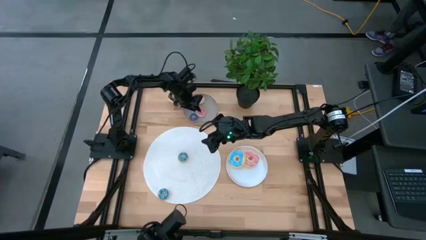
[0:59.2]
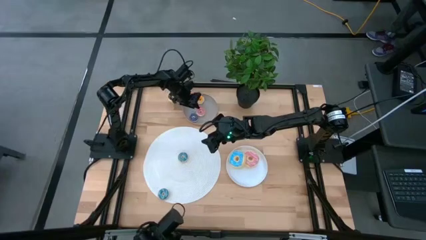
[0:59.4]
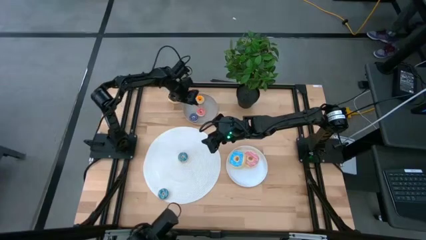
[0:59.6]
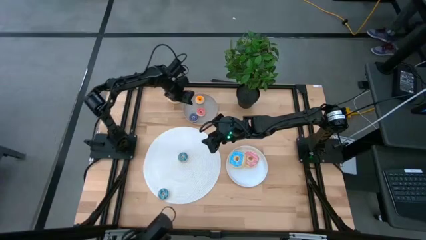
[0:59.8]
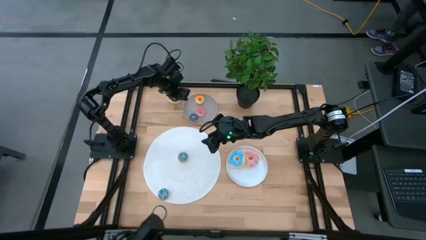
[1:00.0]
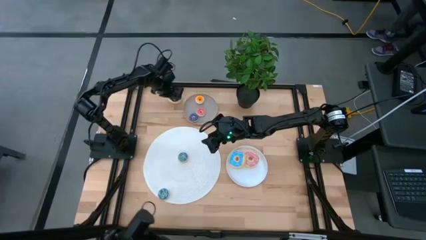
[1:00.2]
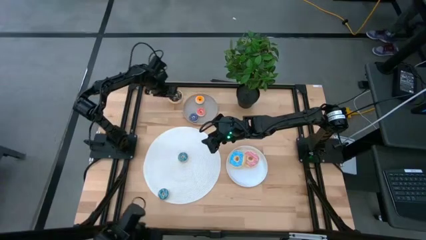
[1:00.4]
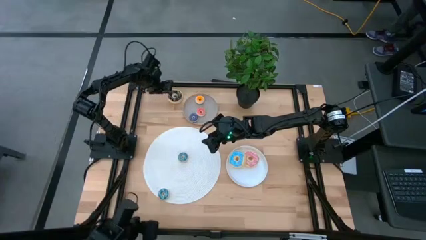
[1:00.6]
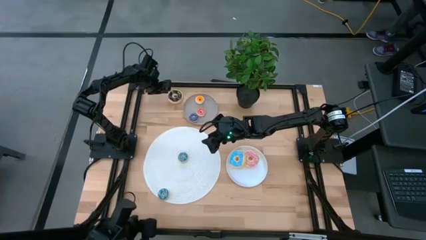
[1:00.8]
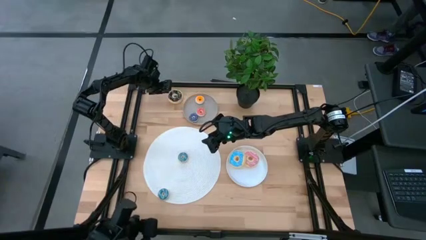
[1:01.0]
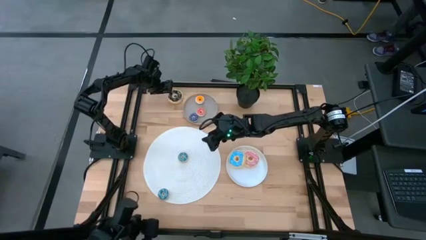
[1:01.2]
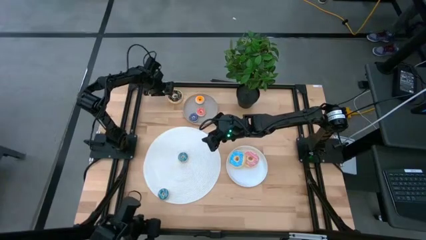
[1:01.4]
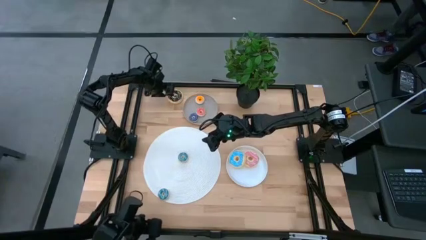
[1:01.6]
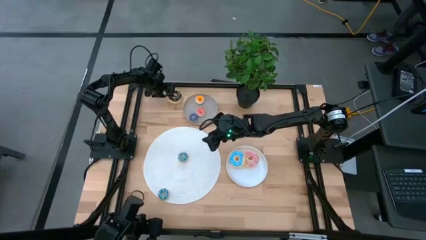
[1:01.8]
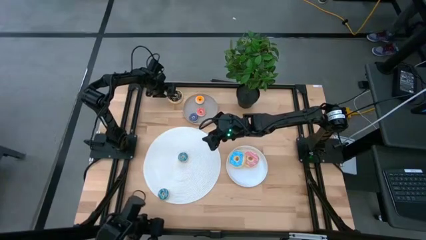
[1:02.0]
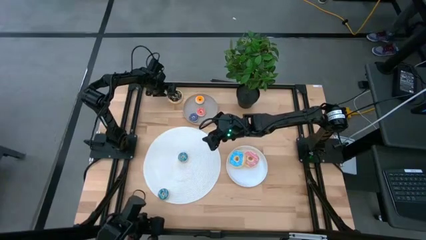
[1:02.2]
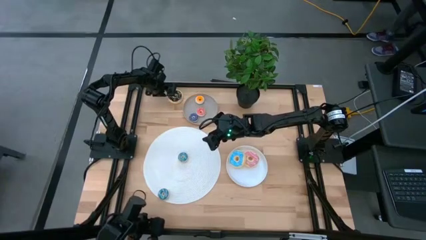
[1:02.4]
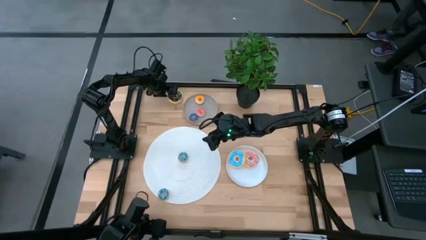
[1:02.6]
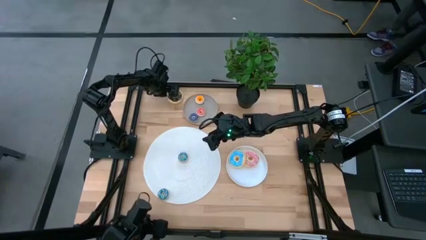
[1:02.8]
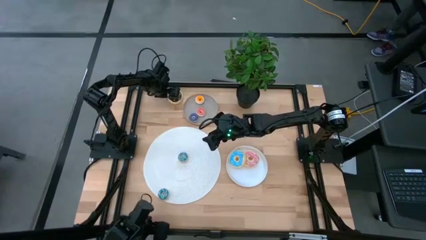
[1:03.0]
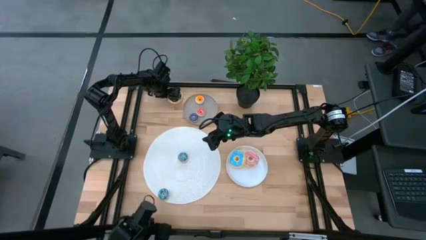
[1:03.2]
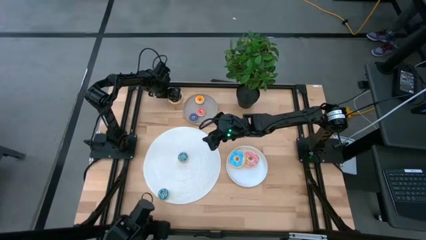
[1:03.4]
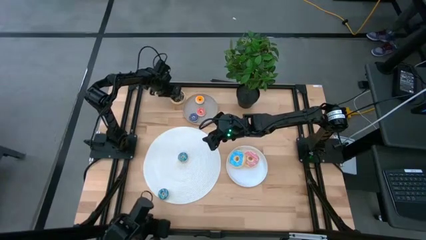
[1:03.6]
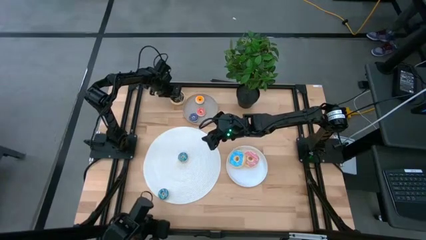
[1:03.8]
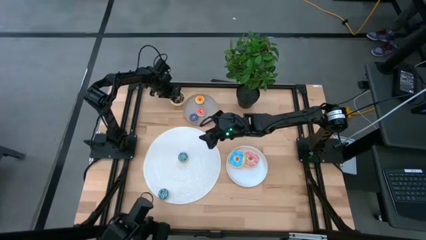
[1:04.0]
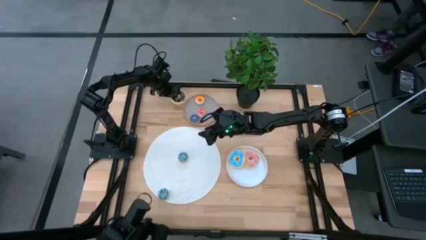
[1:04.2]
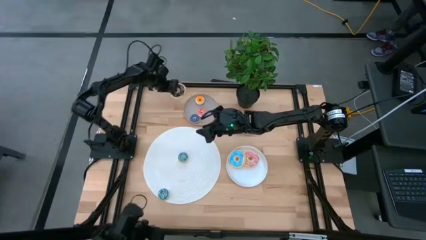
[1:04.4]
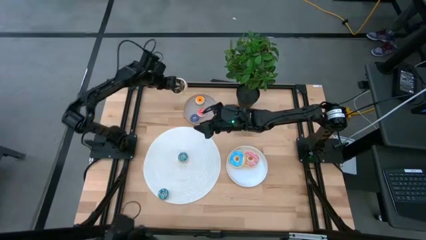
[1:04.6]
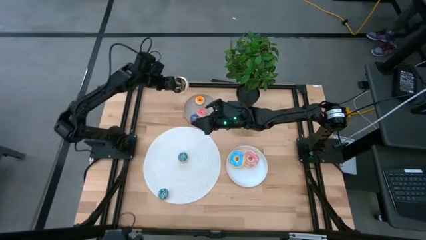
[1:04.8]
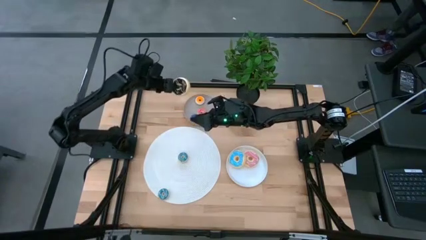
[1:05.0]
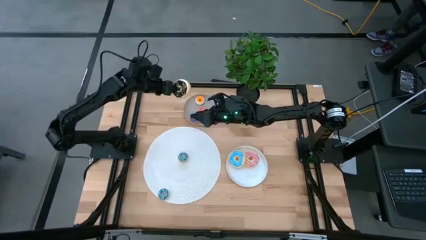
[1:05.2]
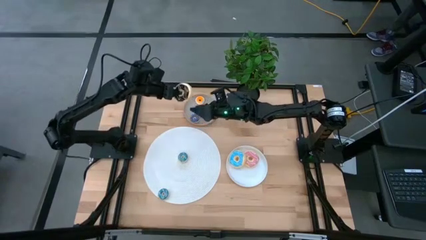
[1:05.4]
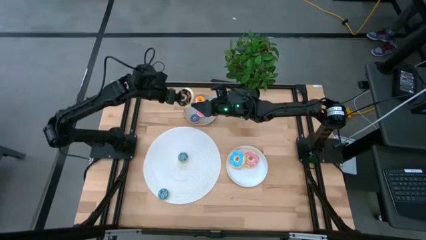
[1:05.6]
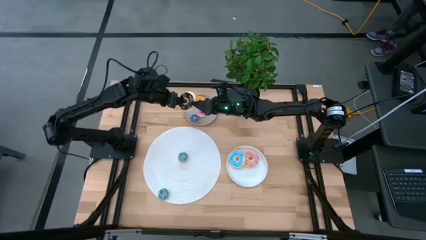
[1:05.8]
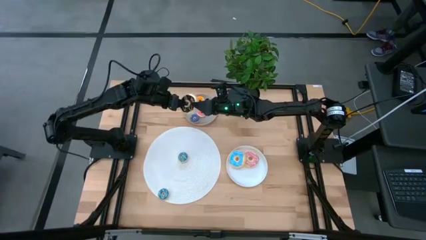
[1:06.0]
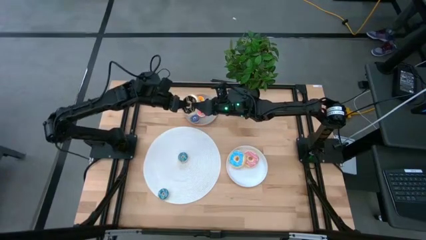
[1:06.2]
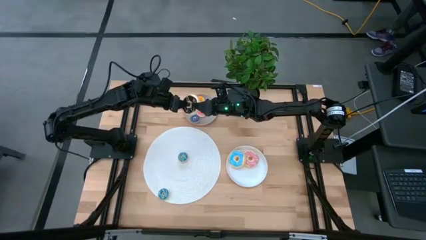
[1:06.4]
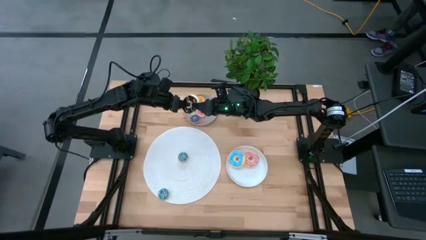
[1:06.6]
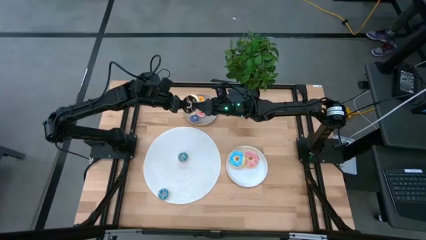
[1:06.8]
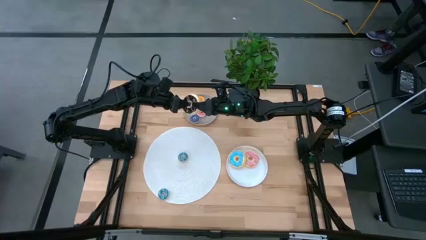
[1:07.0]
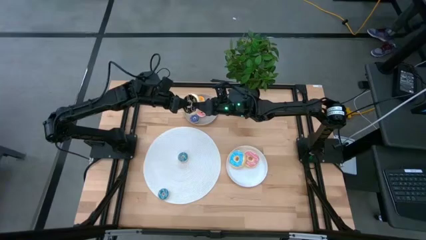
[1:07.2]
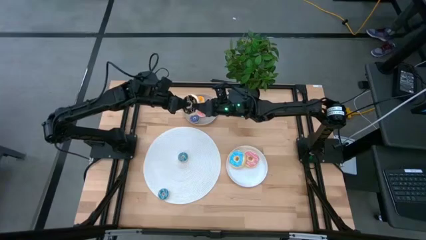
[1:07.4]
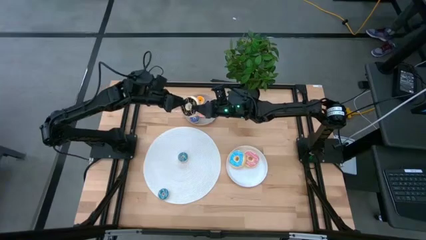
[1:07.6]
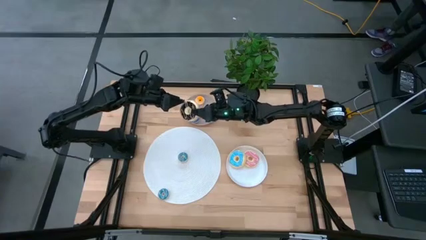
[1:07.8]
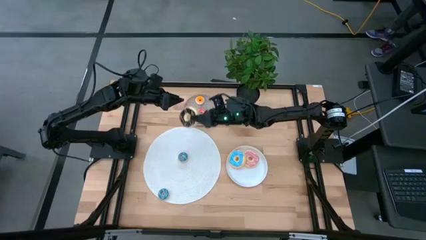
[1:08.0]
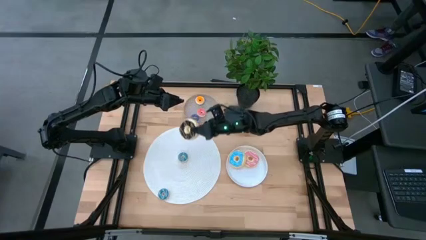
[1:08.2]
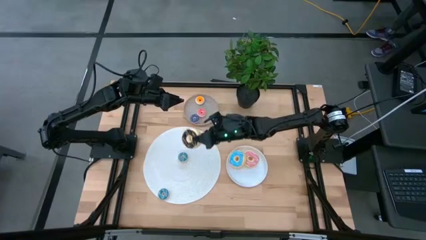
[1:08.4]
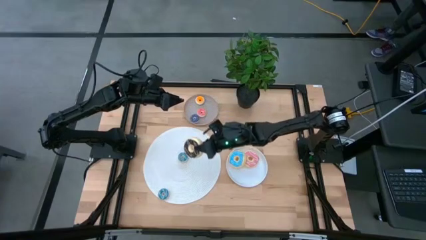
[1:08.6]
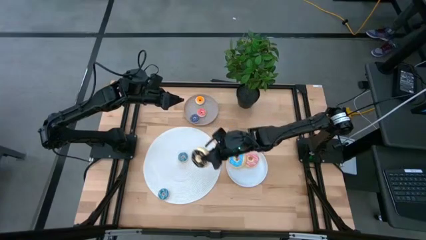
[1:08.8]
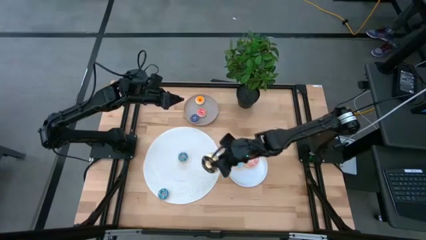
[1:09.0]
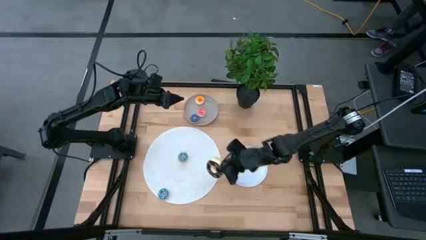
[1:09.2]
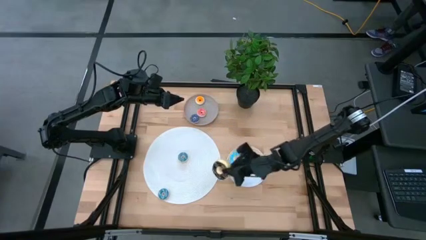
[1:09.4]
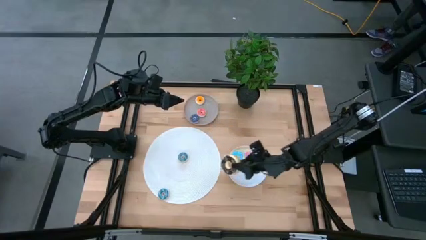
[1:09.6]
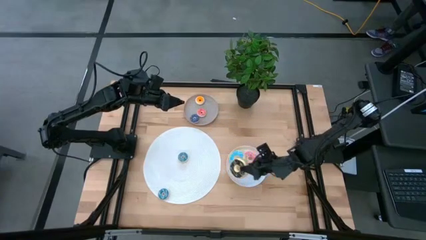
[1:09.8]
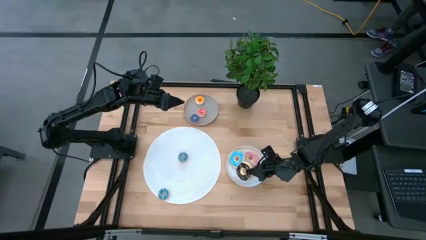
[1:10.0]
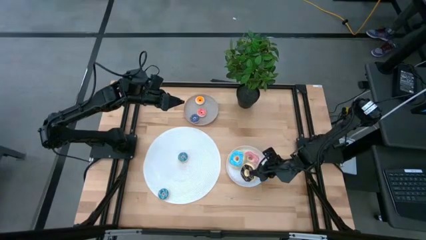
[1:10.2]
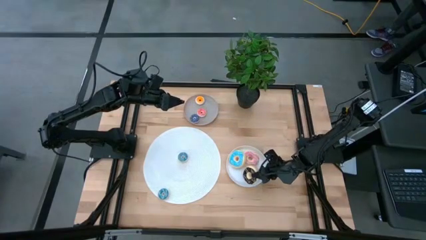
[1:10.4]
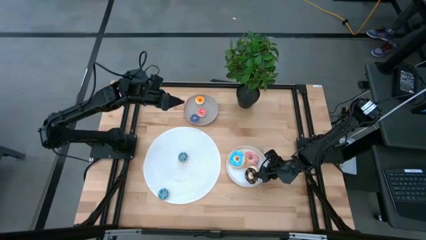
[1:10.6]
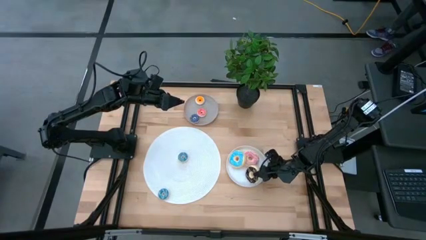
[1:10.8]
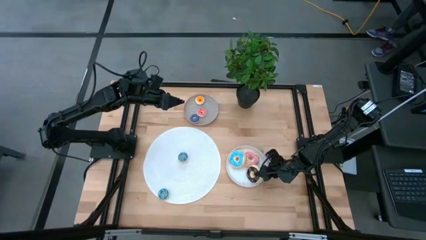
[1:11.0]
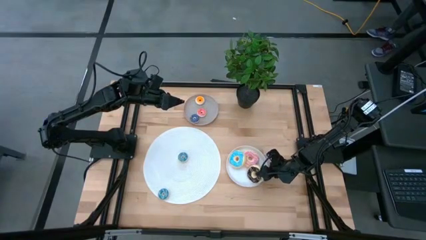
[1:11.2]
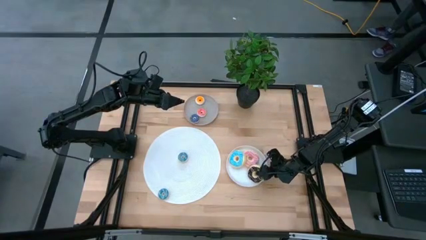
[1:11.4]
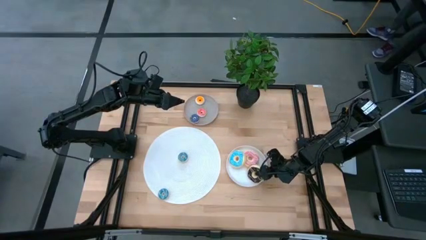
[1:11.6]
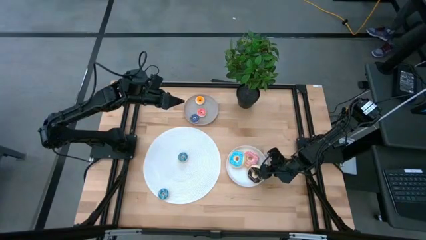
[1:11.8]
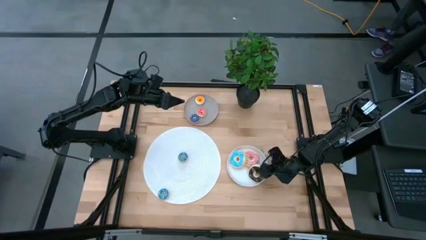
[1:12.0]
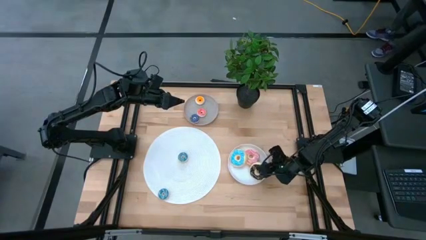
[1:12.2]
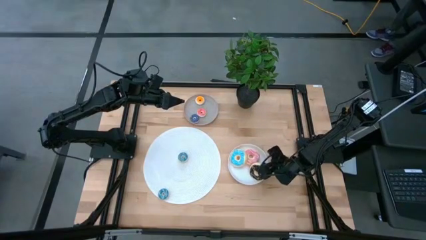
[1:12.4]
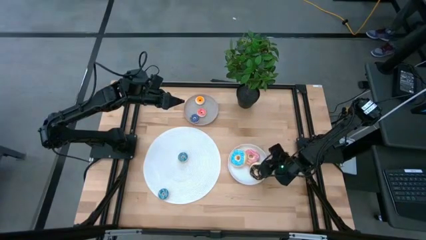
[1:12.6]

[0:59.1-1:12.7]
Task: Pick & Place donuts
Put the large black donut on the white plate

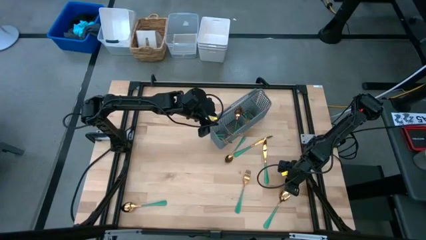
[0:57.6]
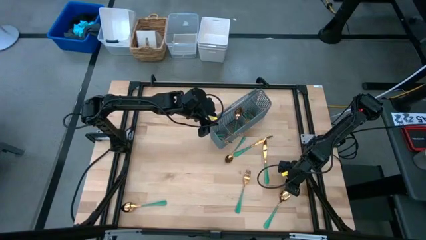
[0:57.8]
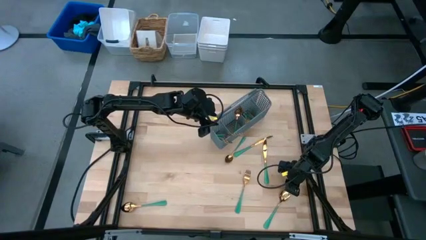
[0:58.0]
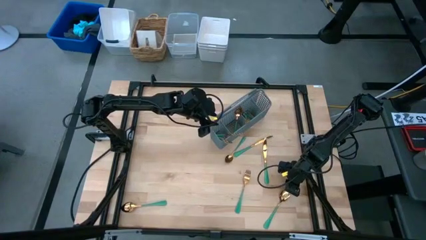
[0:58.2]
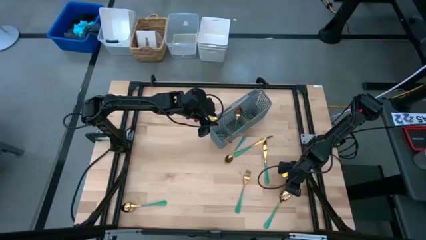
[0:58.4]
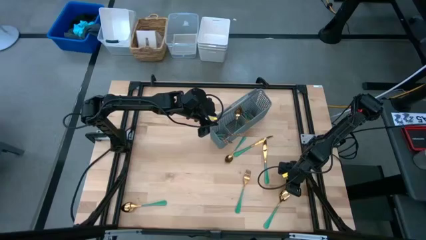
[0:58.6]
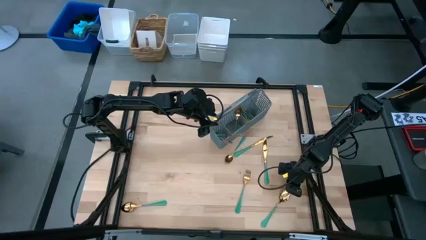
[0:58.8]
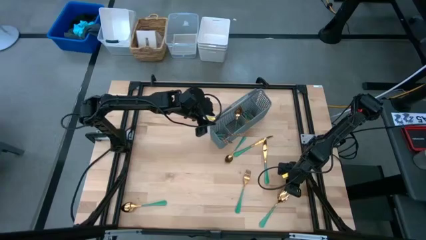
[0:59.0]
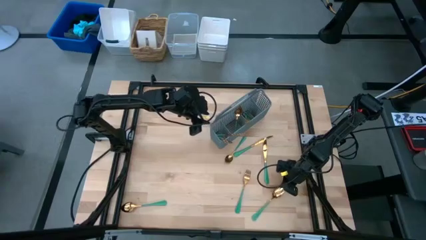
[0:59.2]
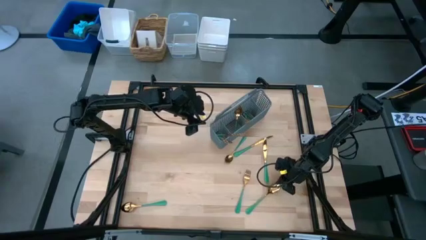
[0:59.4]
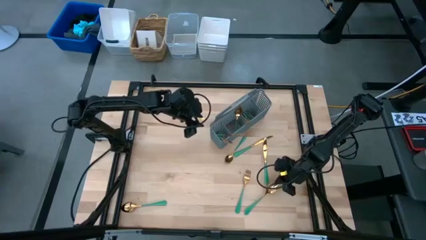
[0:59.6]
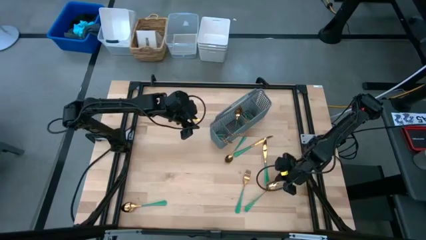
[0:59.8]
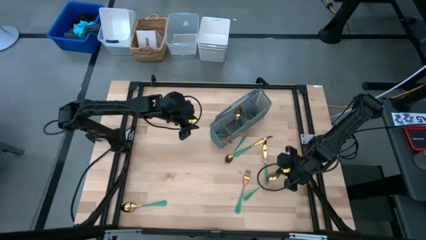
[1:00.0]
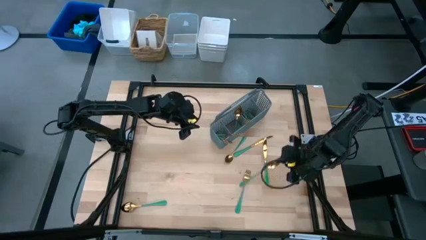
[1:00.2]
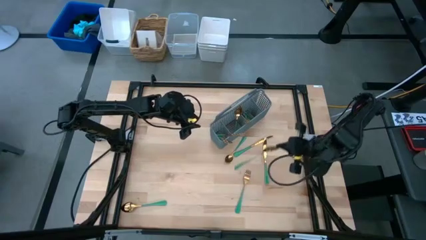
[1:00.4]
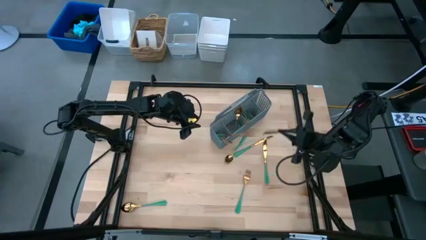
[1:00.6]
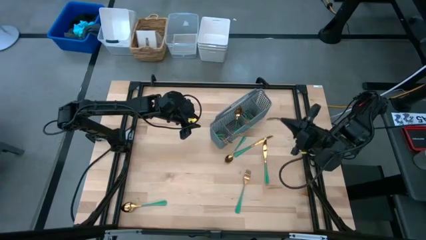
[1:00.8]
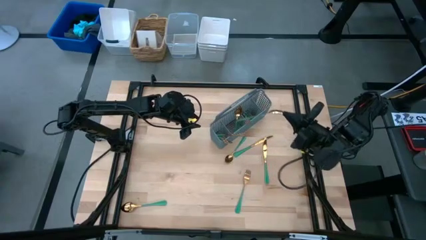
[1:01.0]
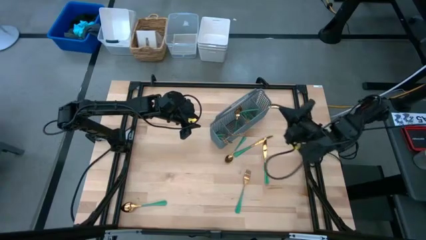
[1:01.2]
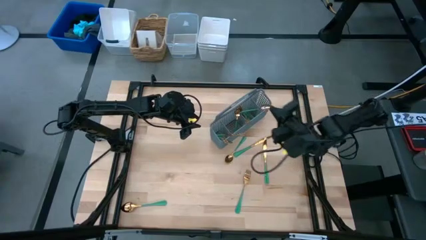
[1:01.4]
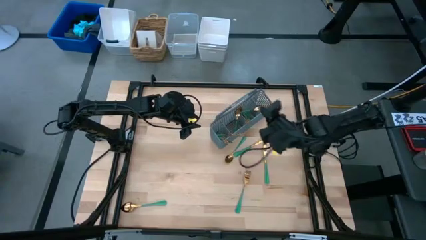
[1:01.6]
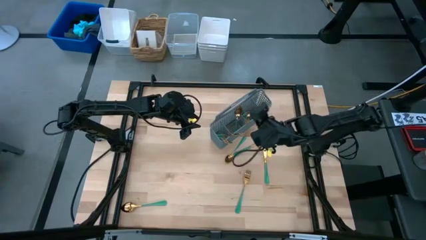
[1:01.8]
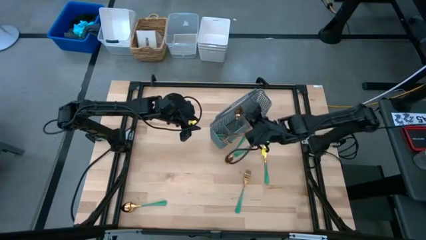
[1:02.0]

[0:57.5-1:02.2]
Task: Sort silverware
Put the bottom left spoon into the basket
